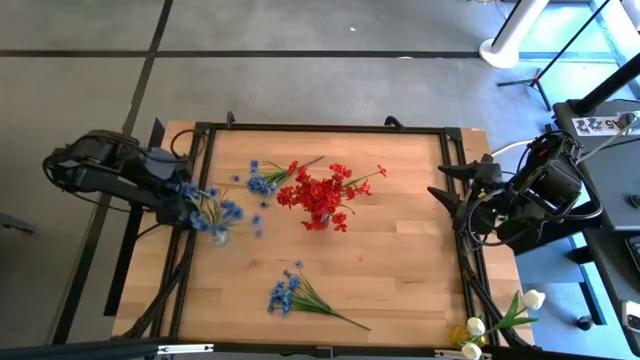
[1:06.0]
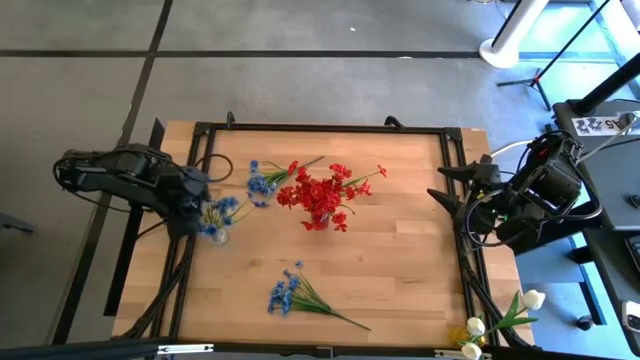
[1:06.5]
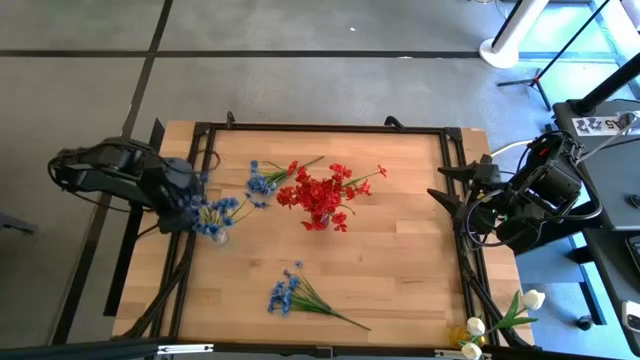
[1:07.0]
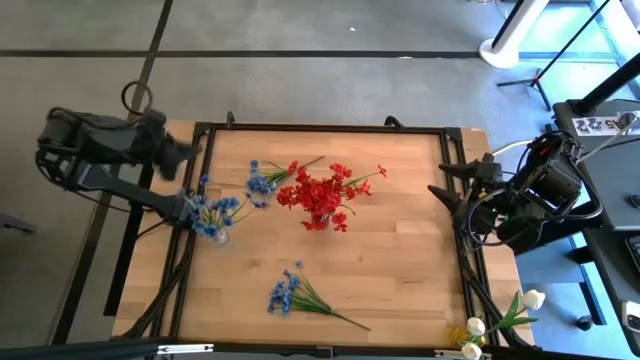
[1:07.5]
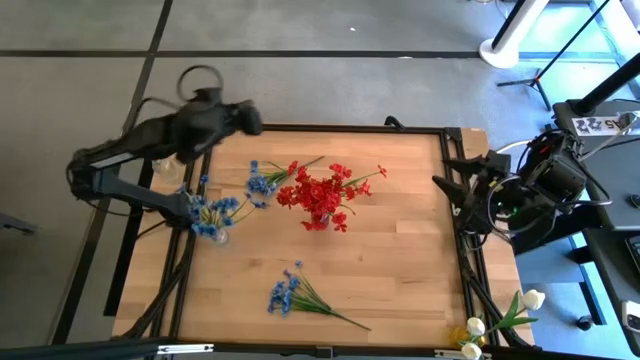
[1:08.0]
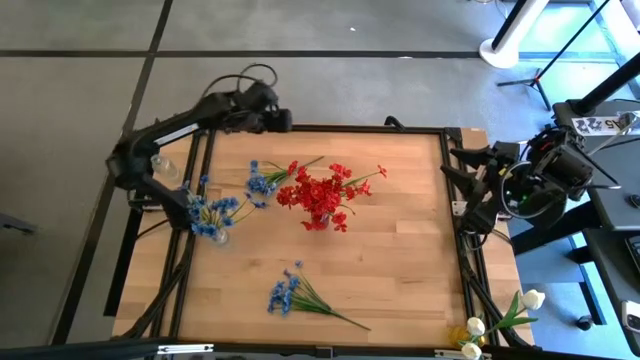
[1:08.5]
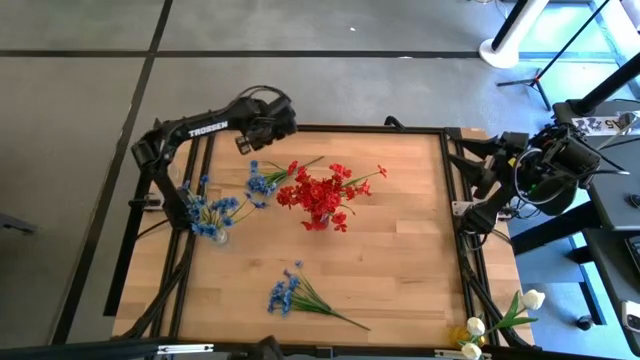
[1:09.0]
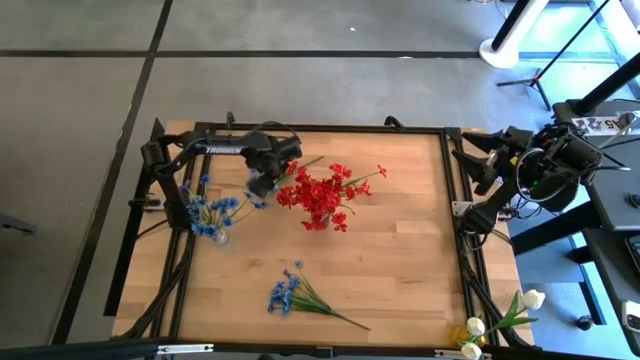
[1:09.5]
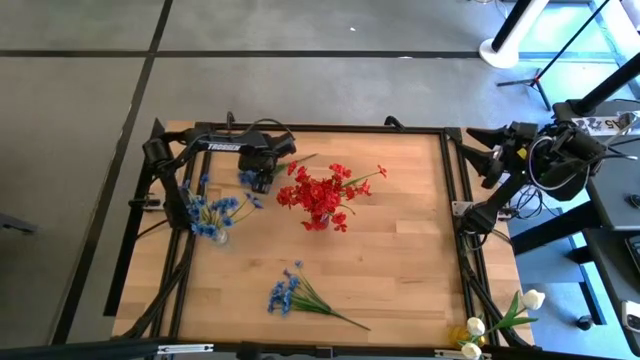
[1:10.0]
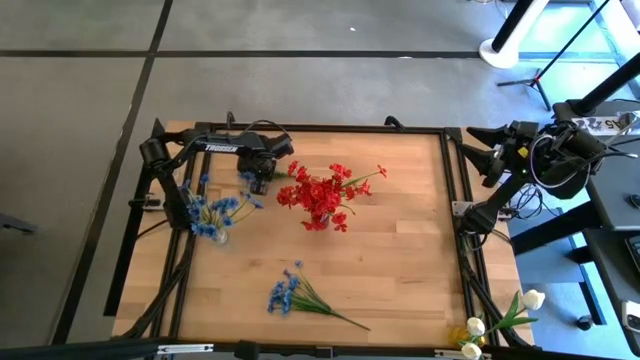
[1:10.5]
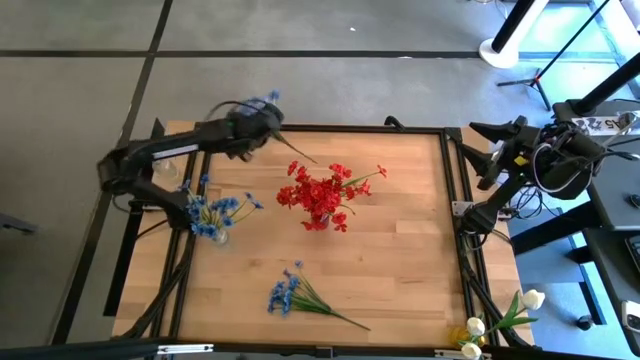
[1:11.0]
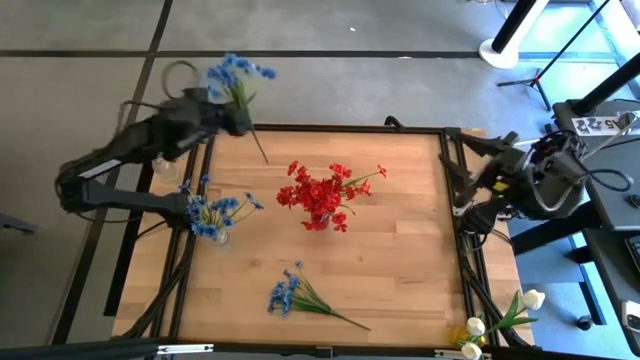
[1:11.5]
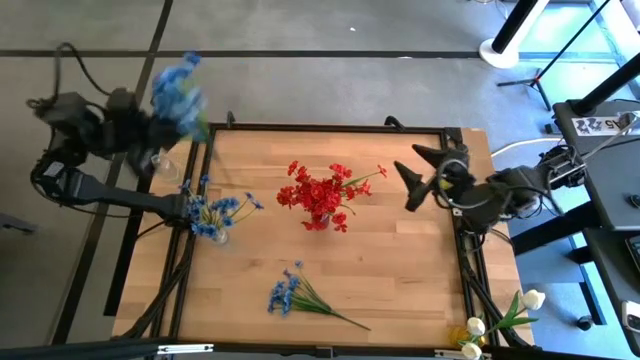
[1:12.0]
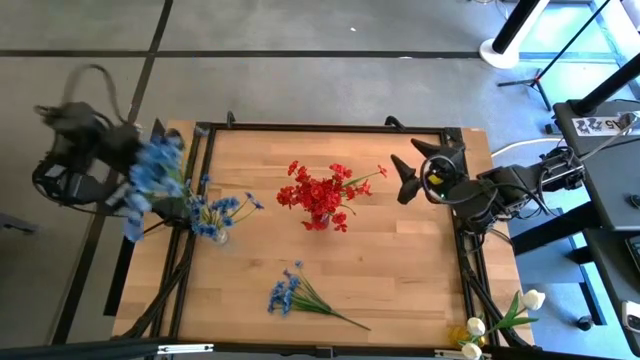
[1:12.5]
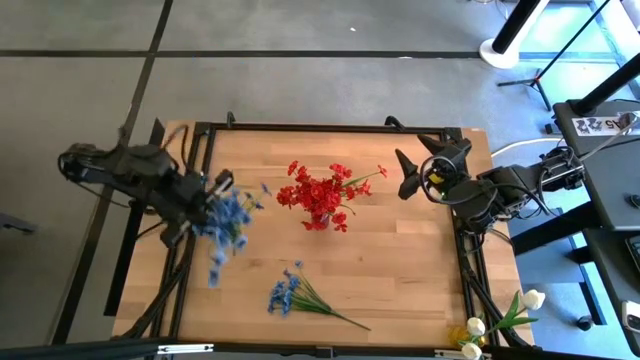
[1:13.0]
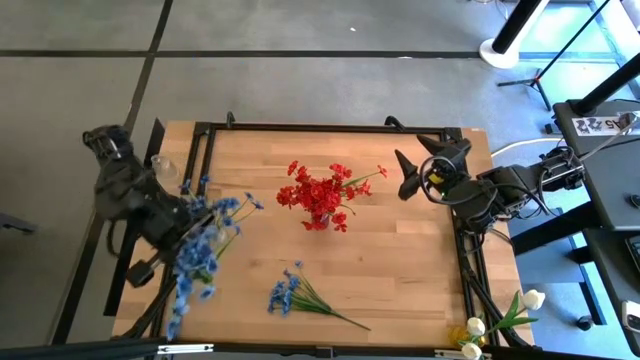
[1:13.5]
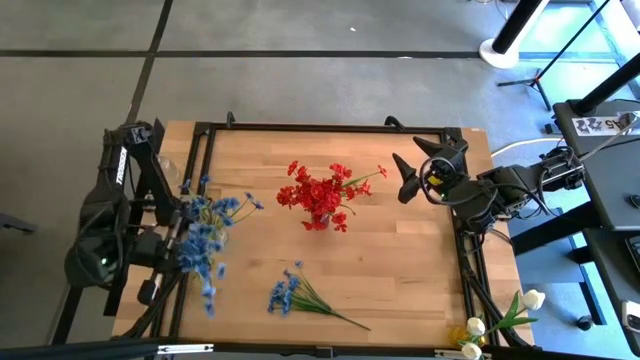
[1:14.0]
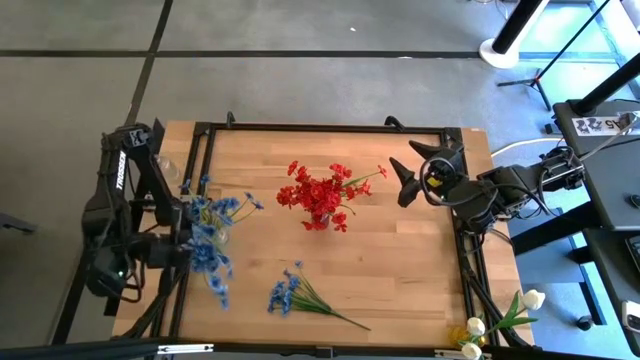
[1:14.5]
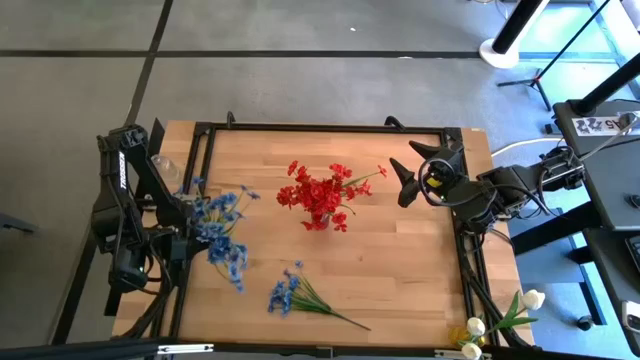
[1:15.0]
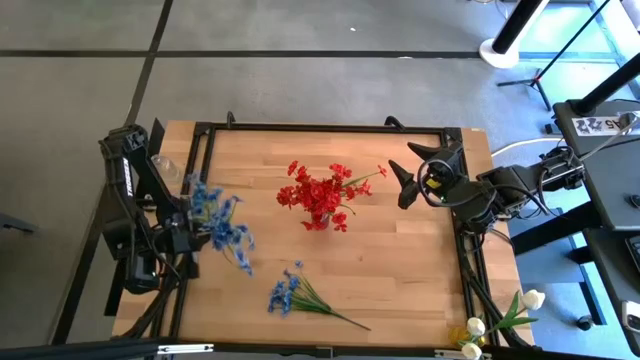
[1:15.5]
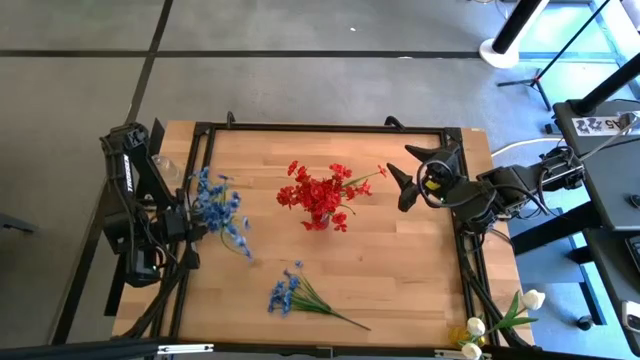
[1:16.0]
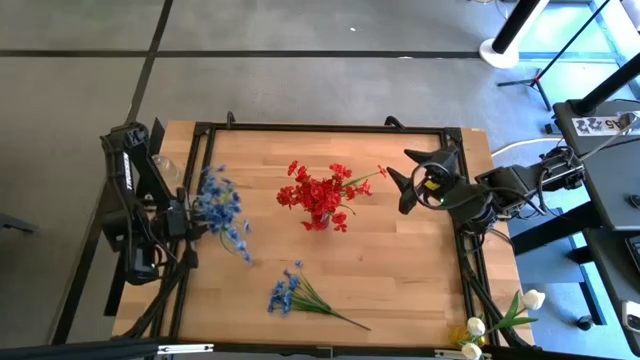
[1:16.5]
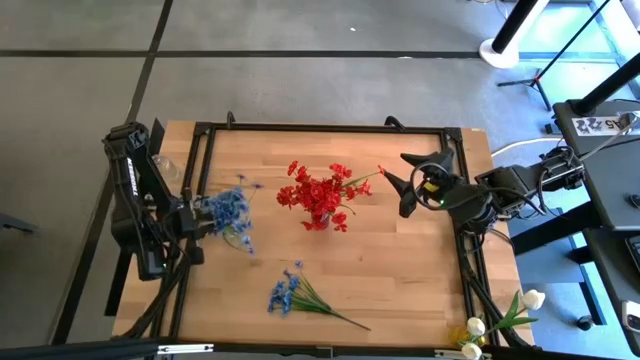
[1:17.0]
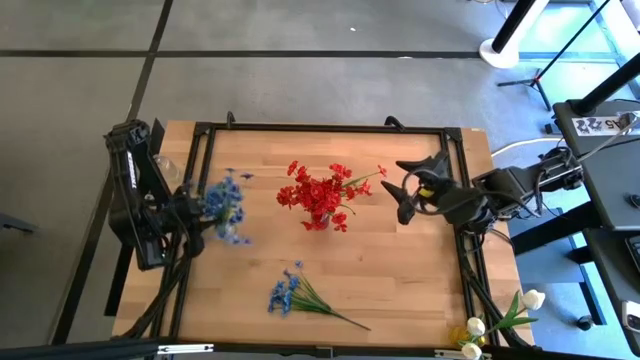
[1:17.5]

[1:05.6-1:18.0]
Task: Sort flowers into vase by color
Put the top blue flowers into the transparent vase

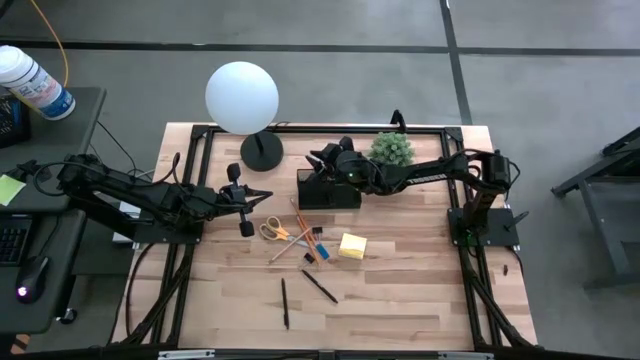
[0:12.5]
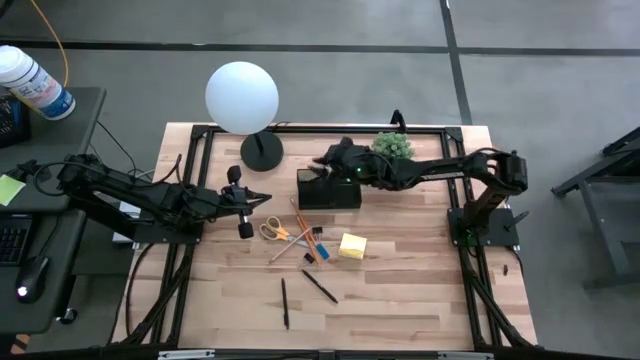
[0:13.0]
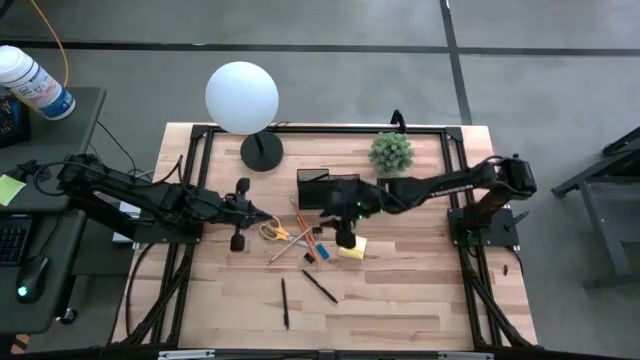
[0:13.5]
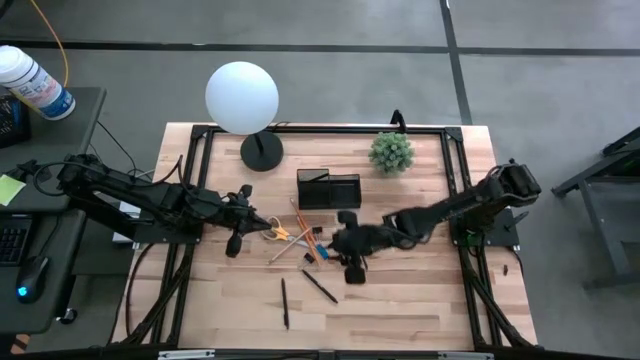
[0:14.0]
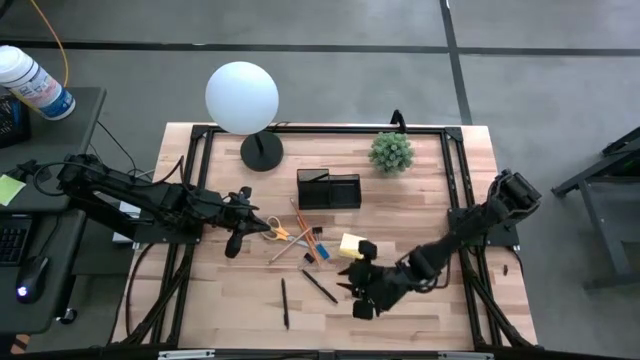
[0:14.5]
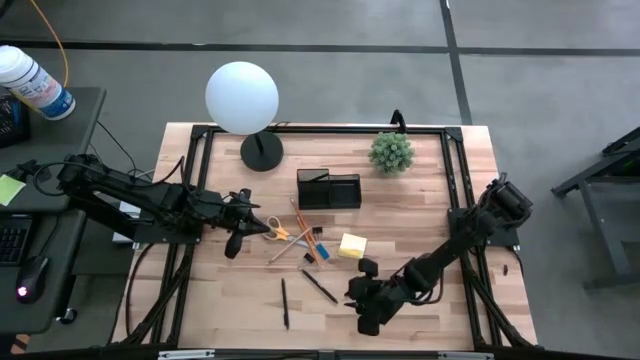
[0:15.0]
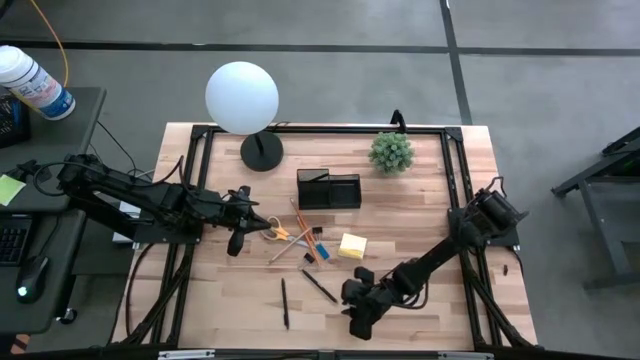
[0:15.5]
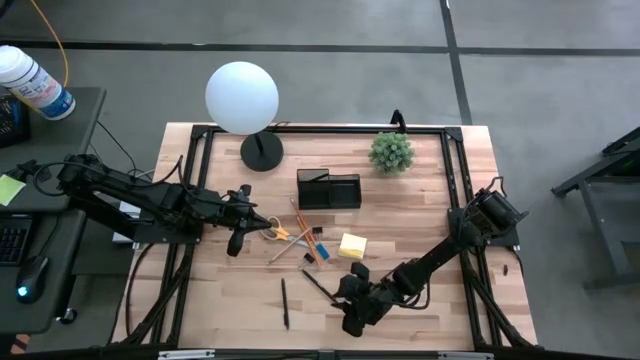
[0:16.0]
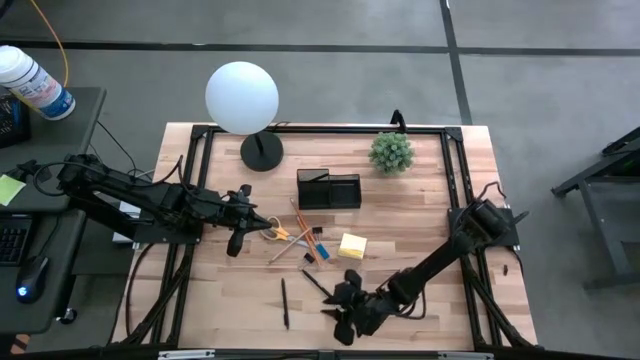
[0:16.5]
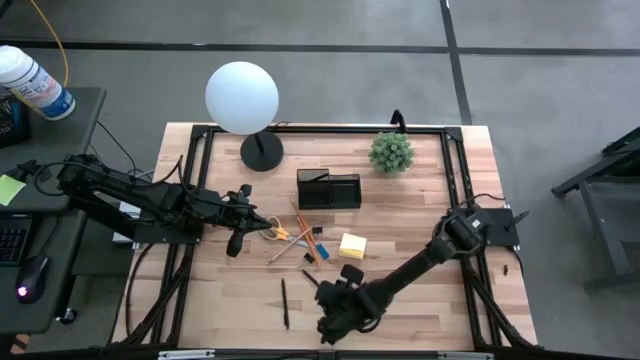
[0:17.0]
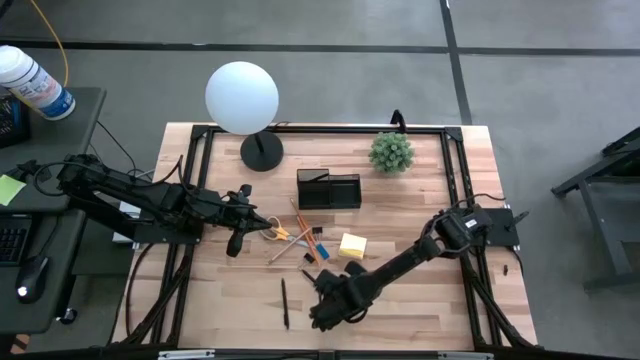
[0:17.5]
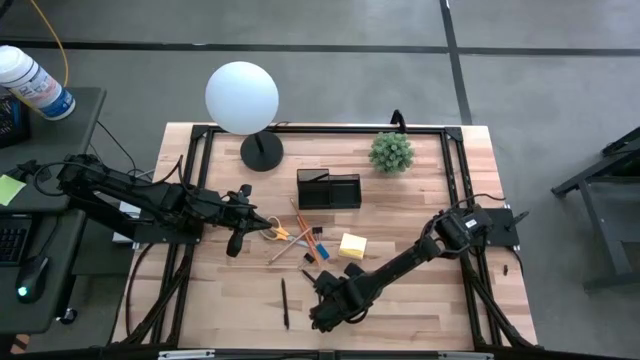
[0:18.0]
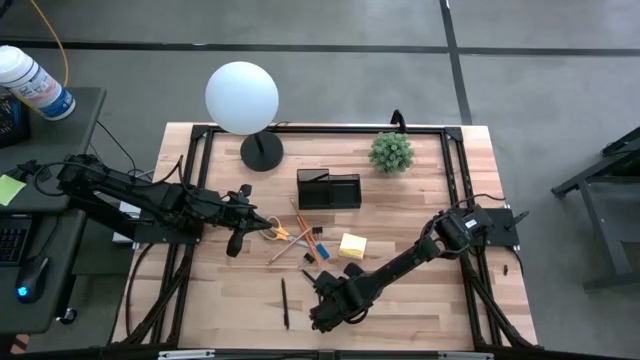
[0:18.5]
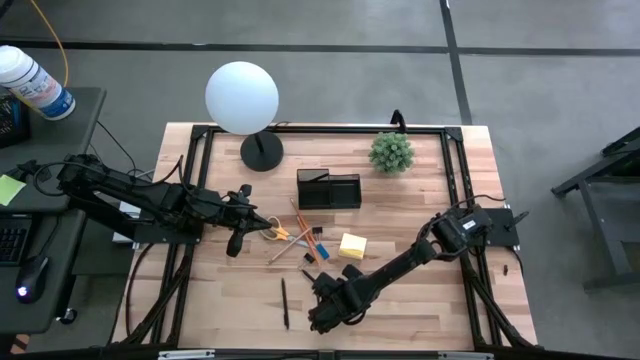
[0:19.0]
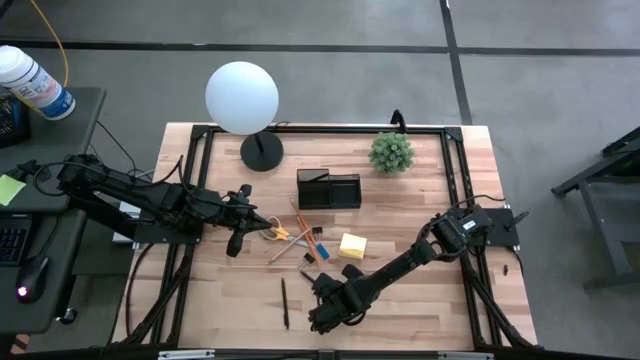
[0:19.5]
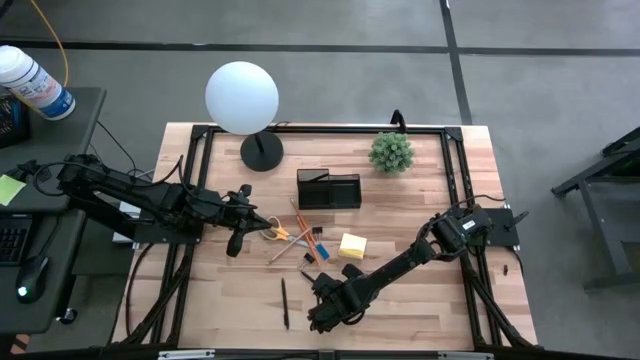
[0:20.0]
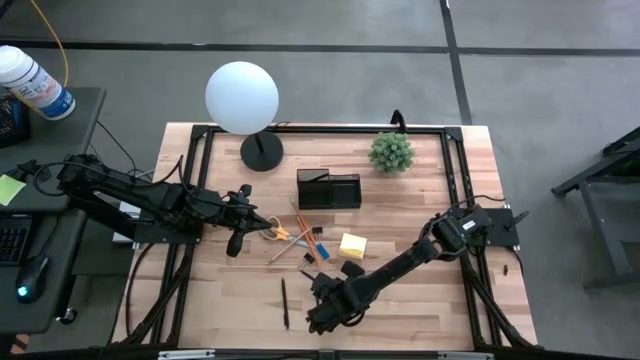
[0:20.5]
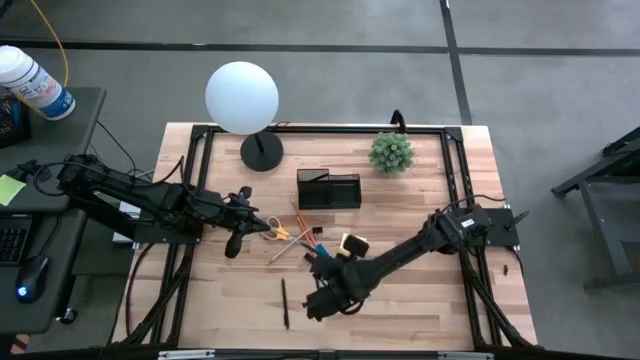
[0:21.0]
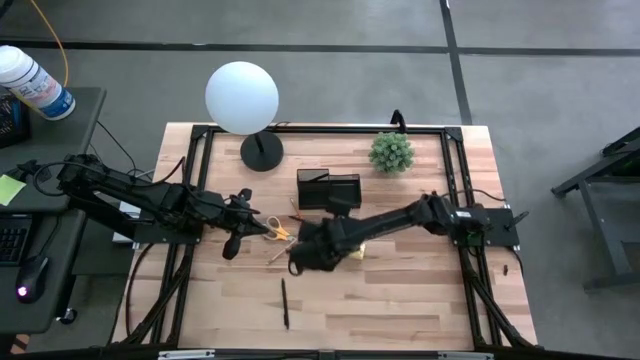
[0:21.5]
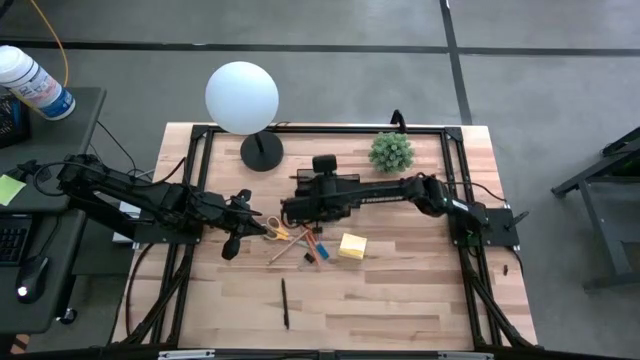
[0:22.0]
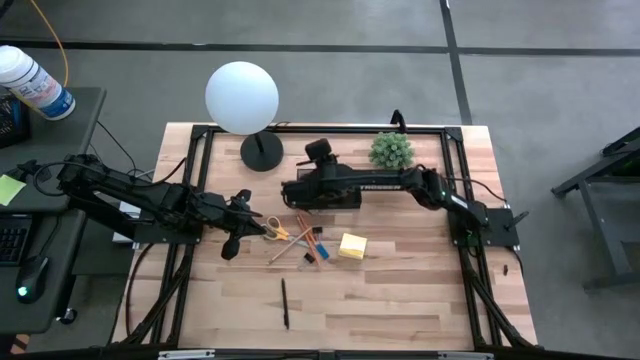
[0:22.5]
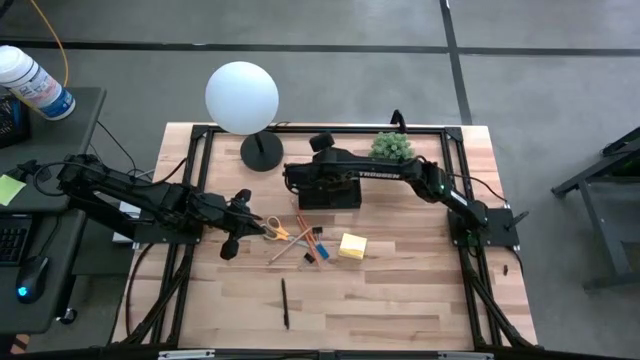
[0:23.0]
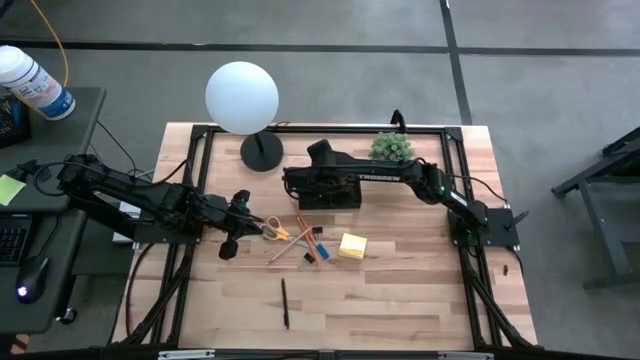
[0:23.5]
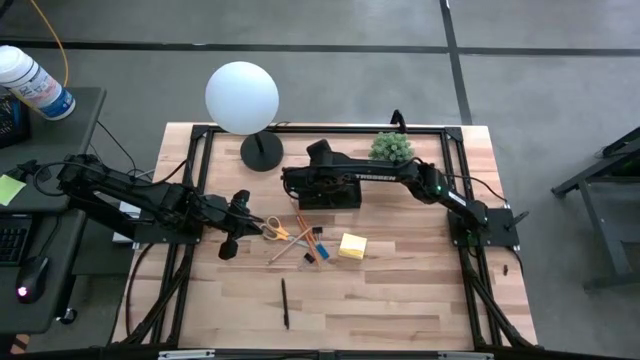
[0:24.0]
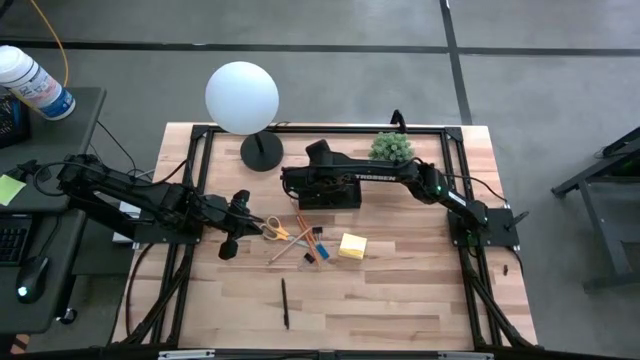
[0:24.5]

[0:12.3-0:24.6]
Task: Pick and place office supplies into organizer
Put the right black pen into the black organizer
